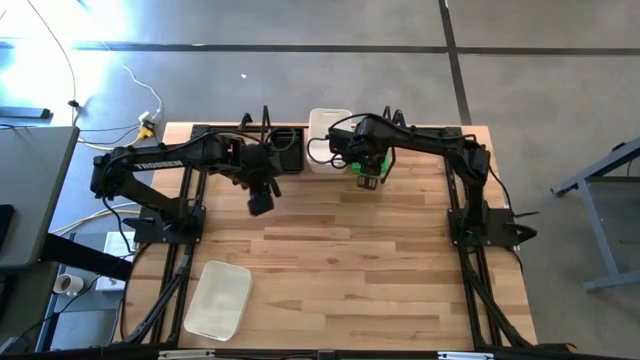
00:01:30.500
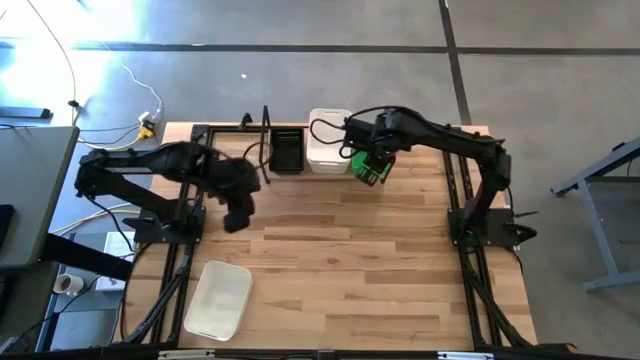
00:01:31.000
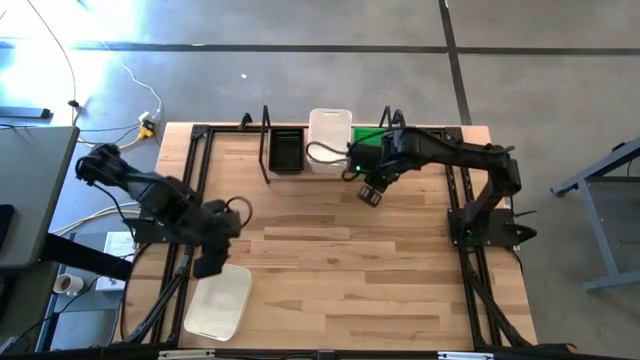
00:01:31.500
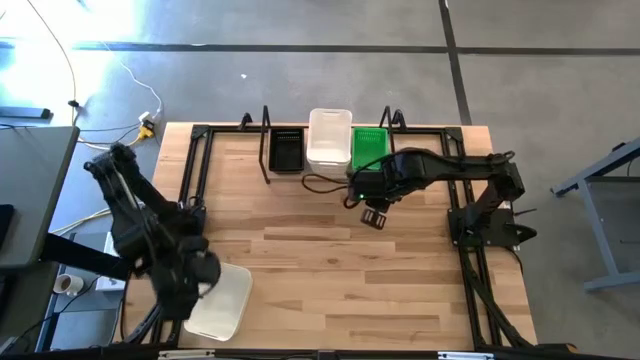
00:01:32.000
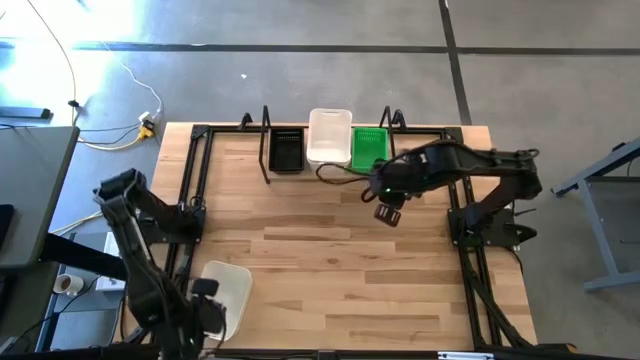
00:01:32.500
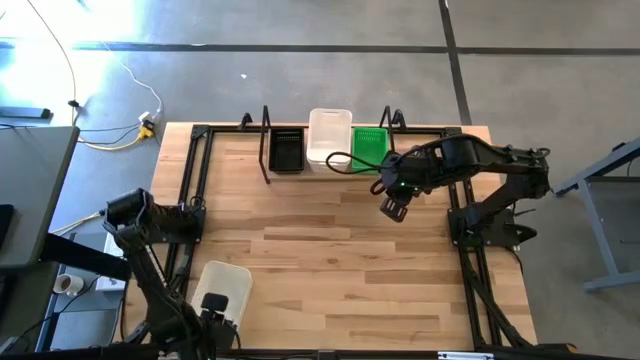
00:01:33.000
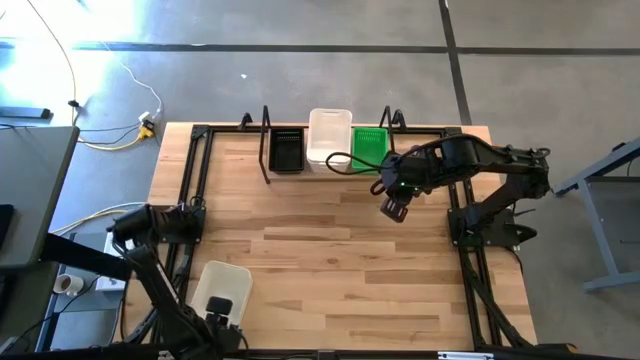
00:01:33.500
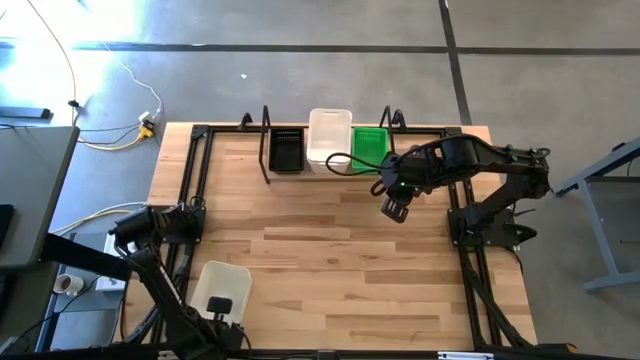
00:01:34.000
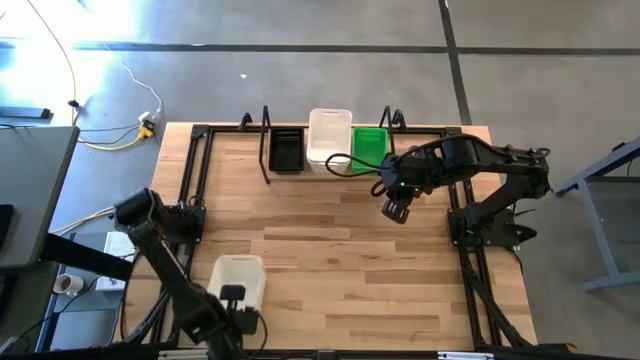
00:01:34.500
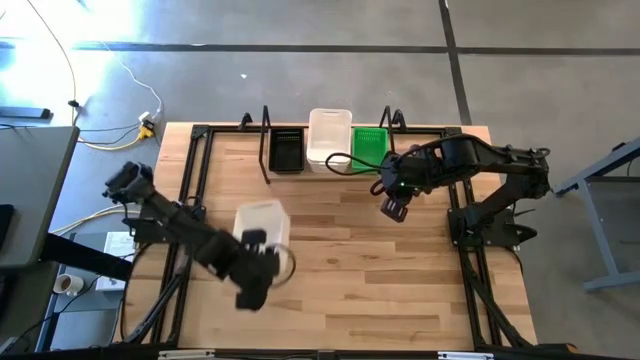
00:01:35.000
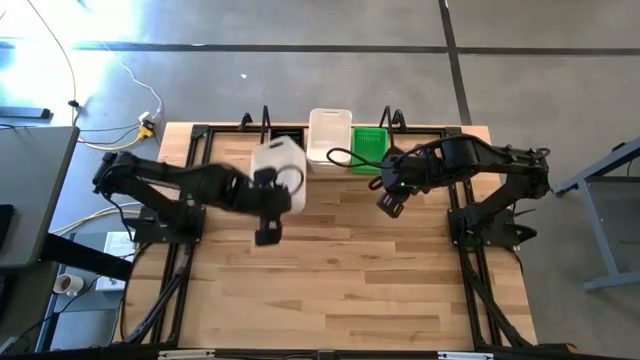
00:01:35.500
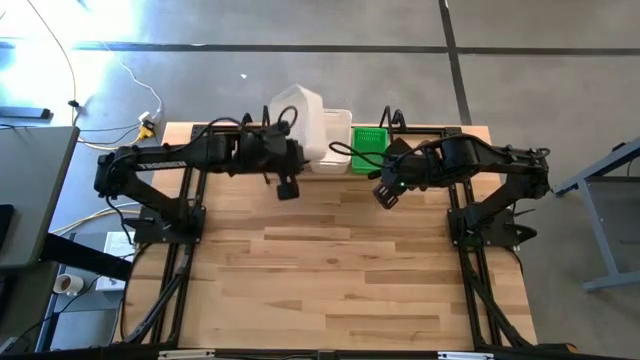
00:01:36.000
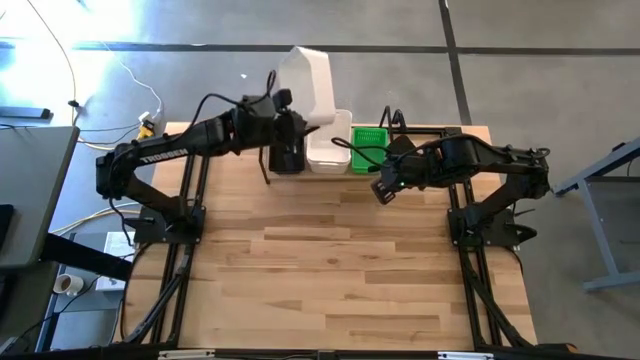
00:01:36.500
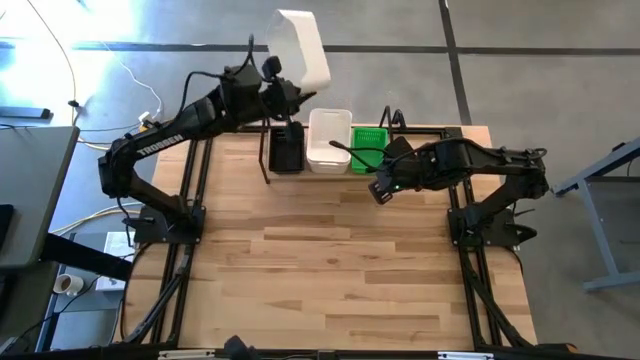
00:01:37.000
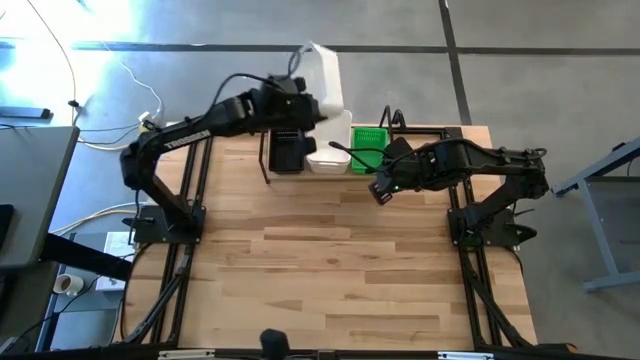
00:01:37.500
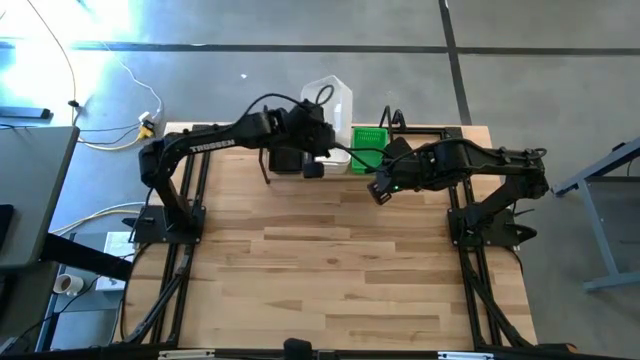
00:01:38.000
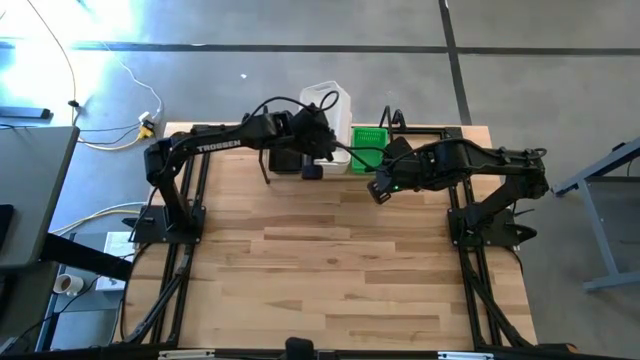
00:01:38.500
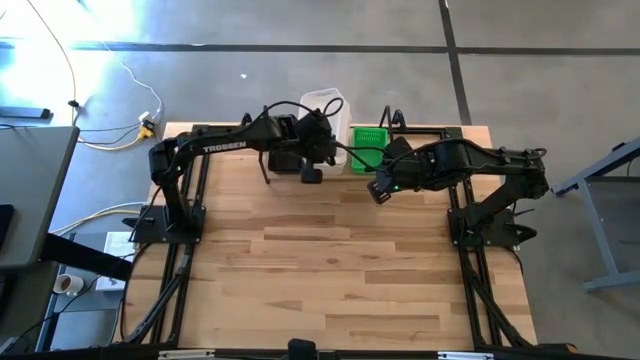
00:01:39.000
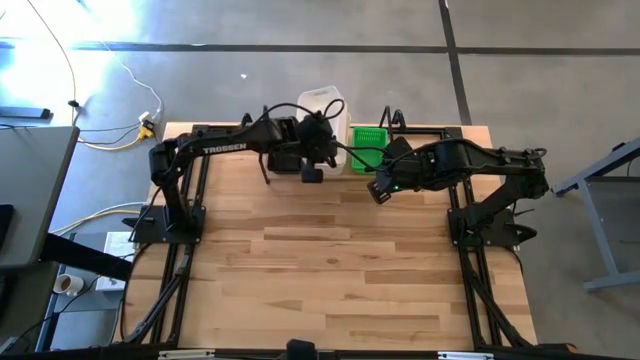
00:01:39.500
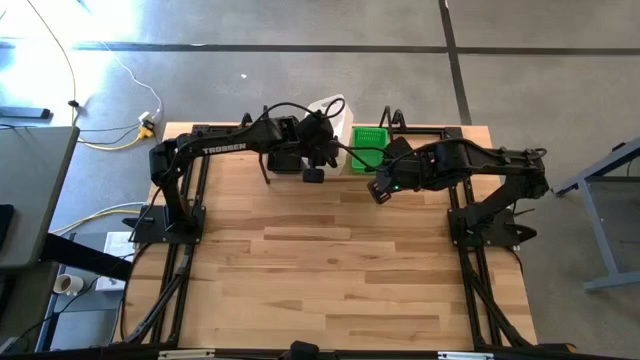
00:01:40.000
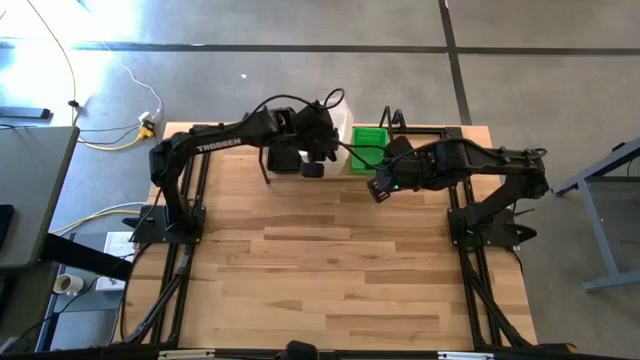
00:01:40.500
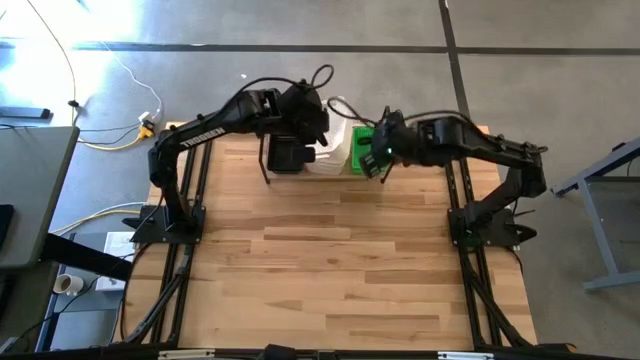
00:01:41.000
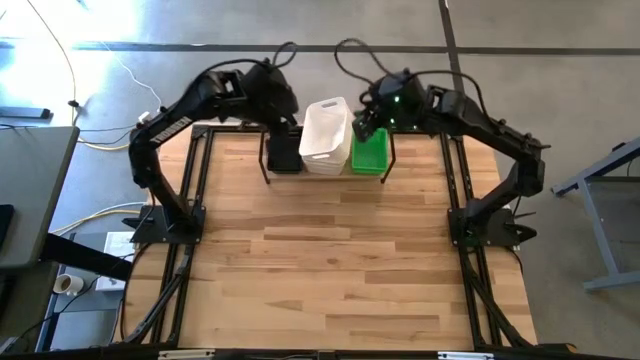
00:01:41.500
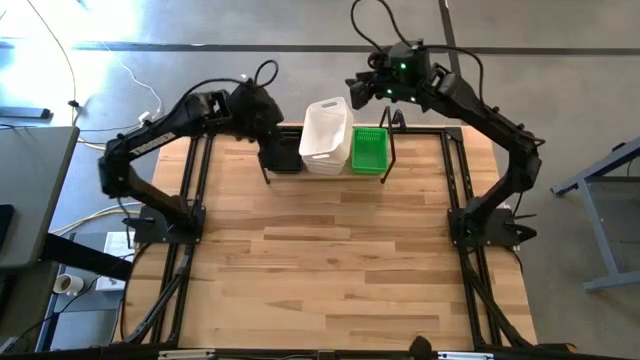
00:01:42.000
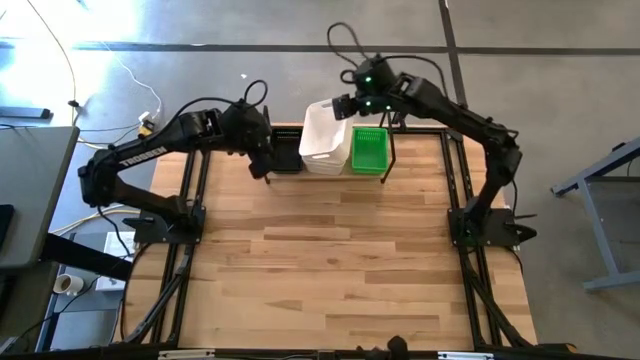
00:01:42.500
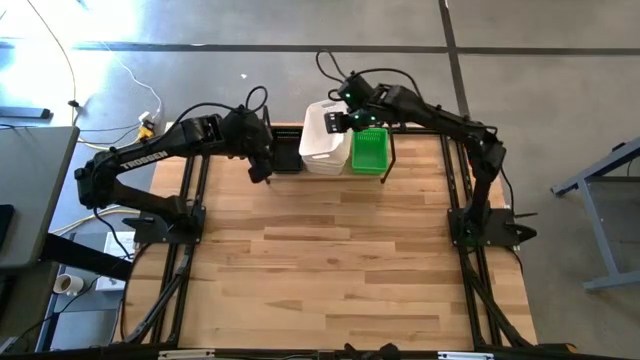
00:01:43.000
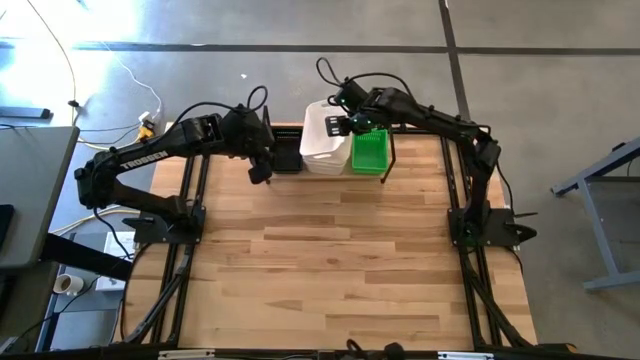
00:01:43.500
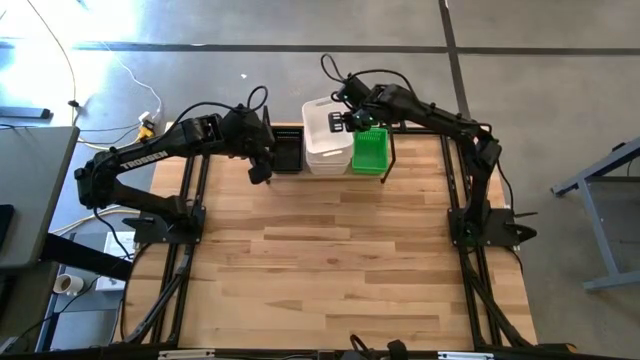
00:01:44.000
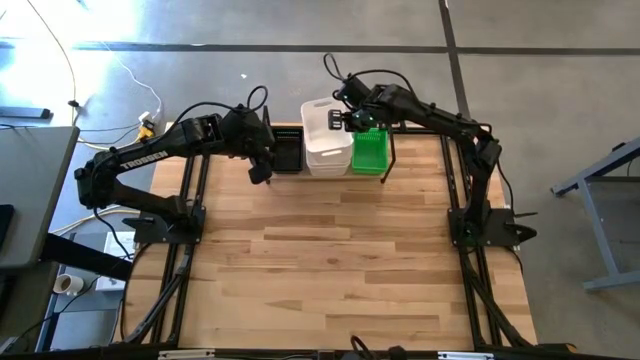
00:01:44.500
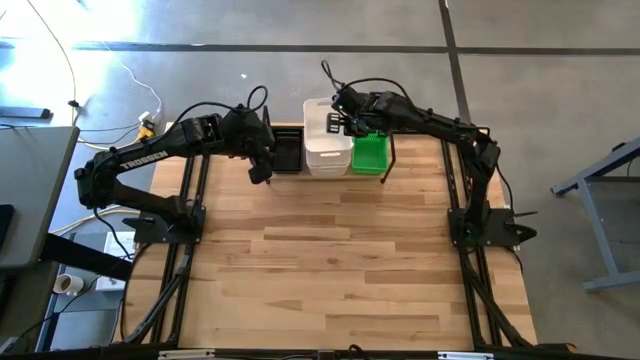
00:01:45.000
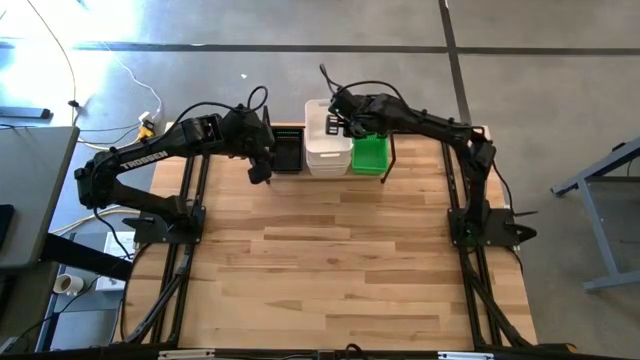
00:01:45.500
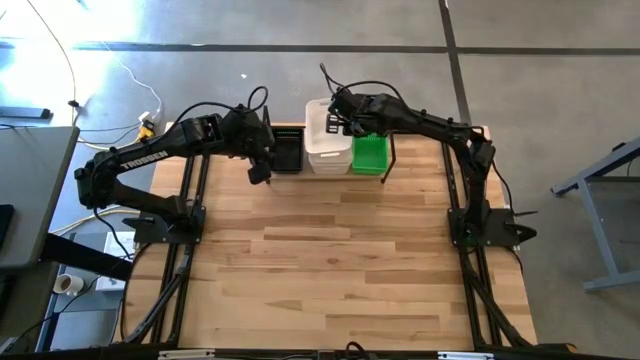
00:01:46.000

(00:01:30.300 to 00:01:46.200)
Task: Stack baskets on shelf by color
Stack the white bin on top of the other white bins on the shelf

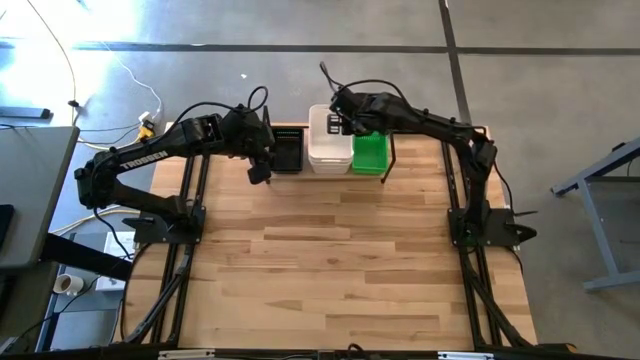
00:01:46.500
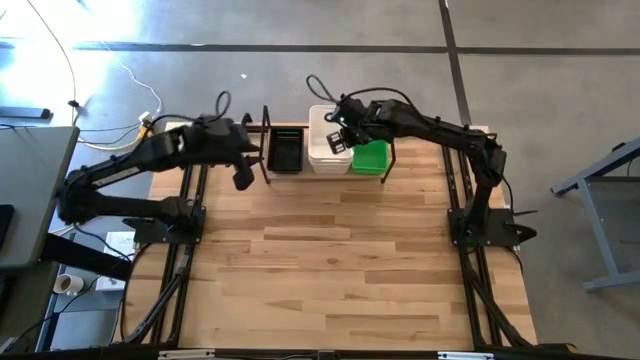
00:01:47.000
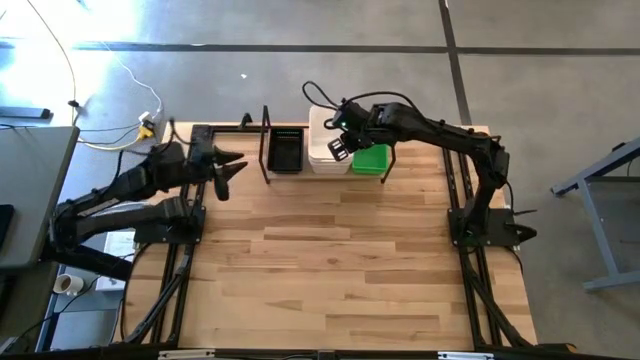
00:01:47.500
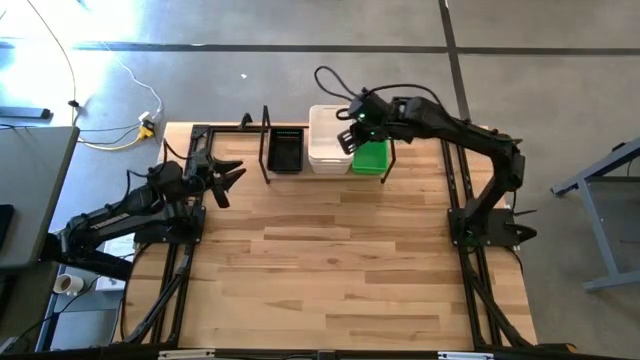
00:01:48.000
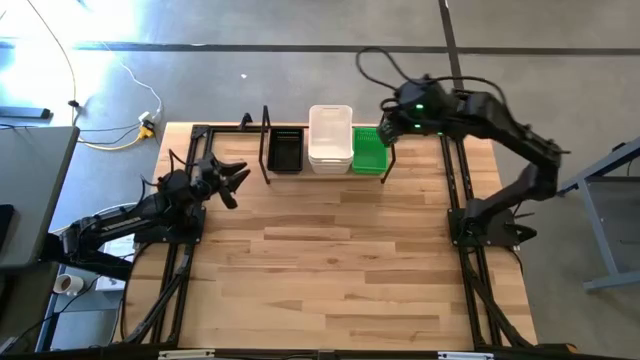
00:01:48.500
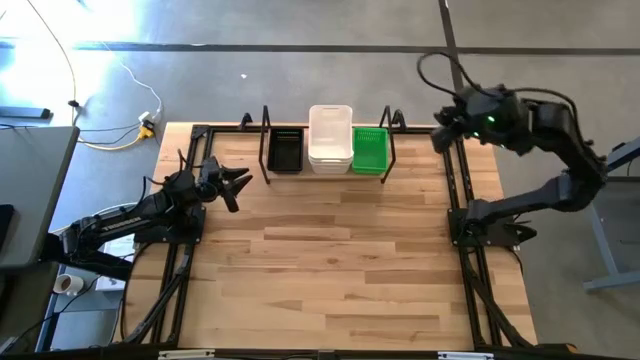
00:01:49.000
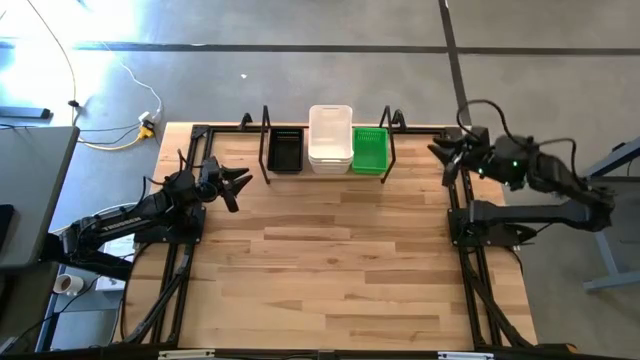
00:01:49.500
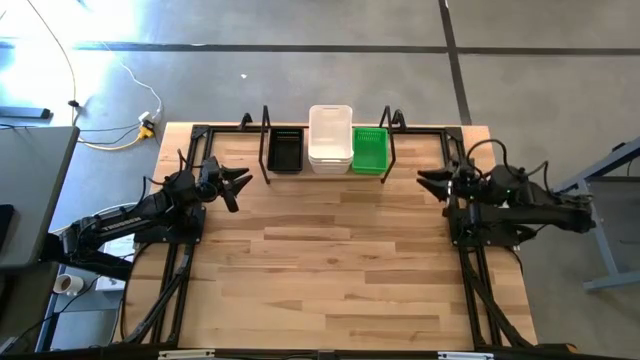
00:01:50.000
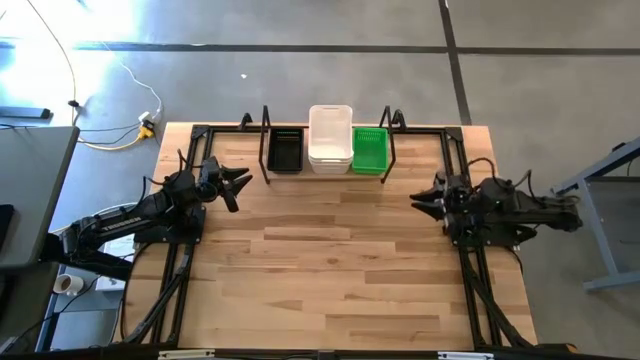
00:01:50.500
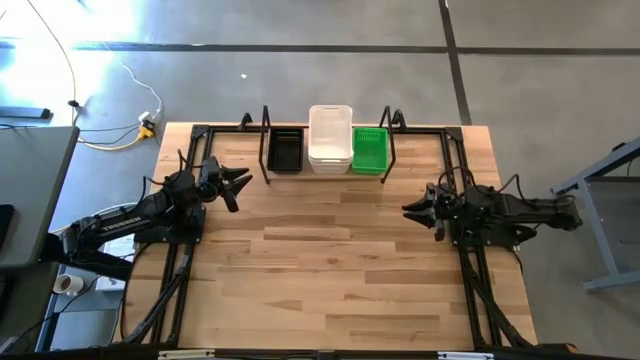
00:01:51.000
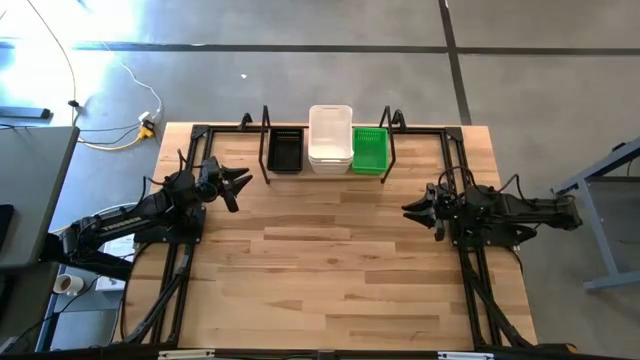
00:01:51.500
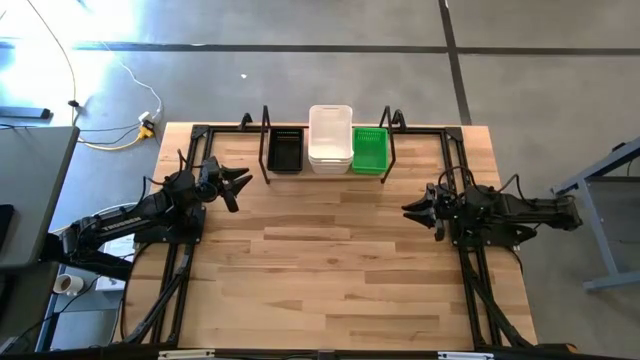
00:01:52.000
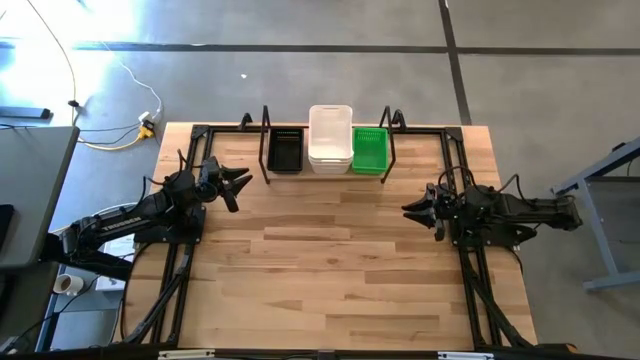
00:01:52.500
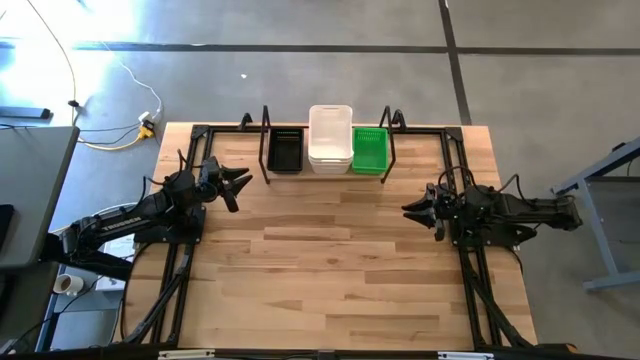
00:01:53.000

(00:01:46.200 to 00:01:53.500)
Return to Home Position
